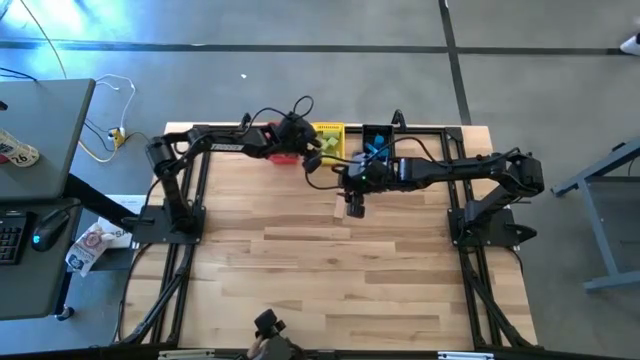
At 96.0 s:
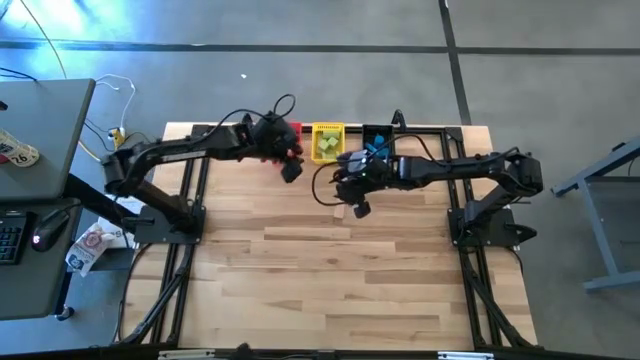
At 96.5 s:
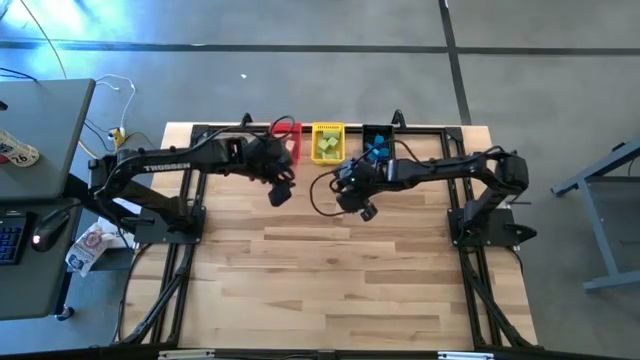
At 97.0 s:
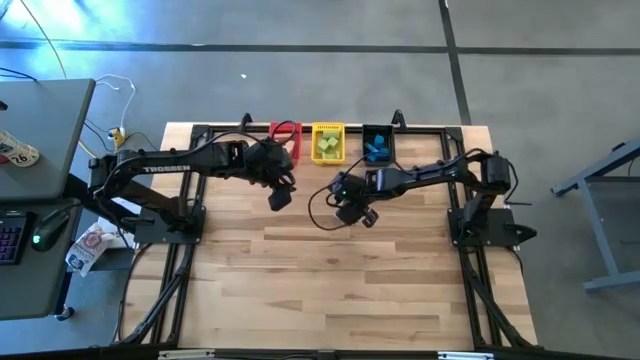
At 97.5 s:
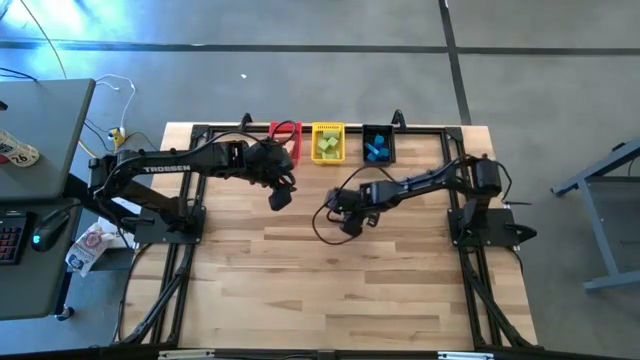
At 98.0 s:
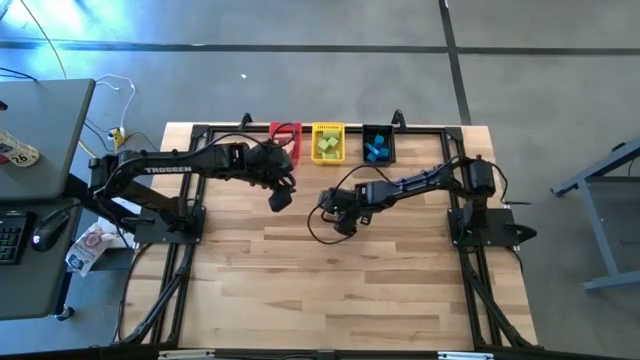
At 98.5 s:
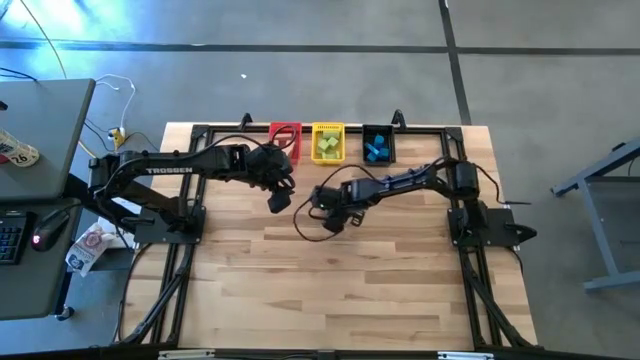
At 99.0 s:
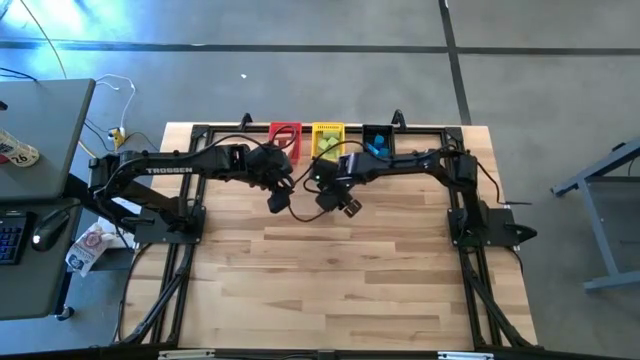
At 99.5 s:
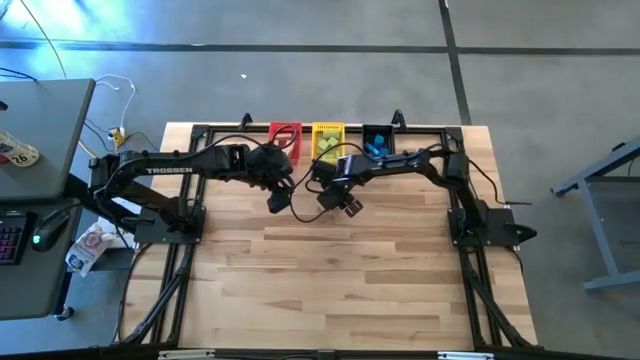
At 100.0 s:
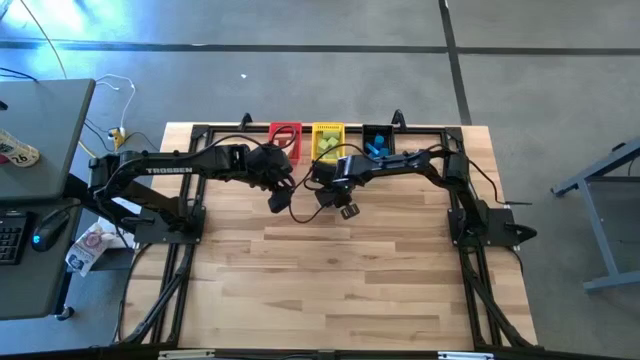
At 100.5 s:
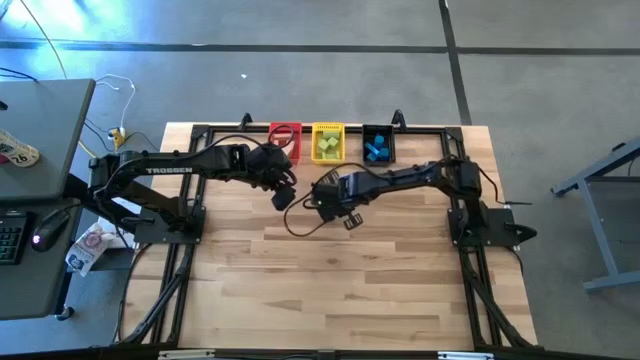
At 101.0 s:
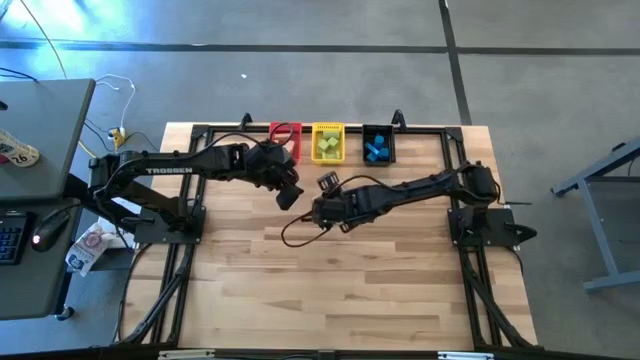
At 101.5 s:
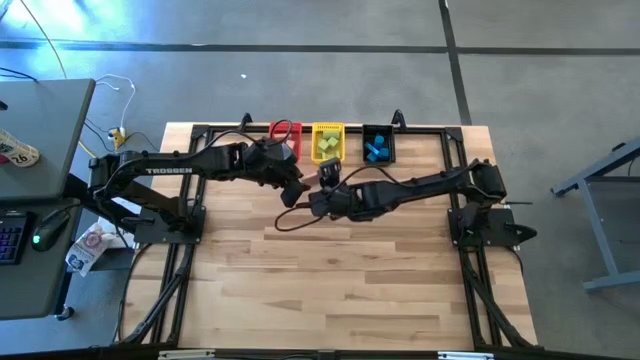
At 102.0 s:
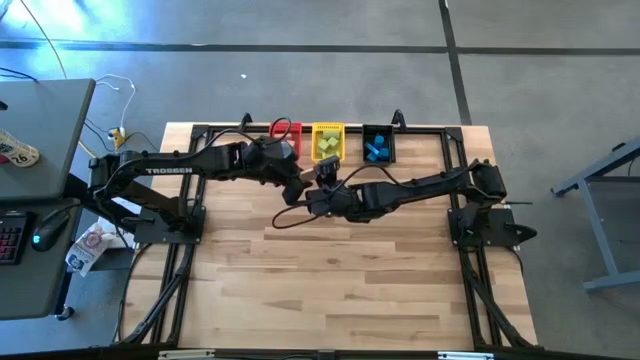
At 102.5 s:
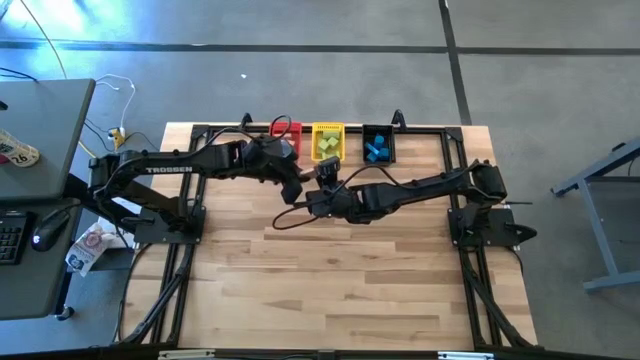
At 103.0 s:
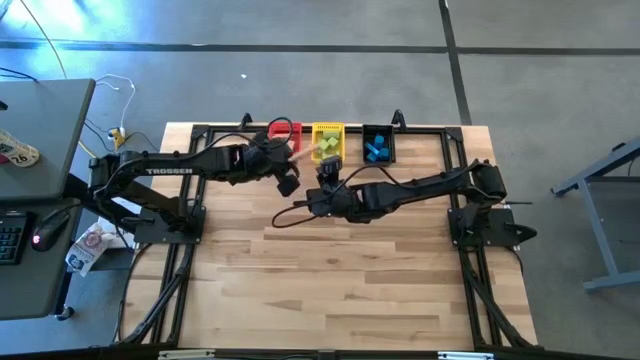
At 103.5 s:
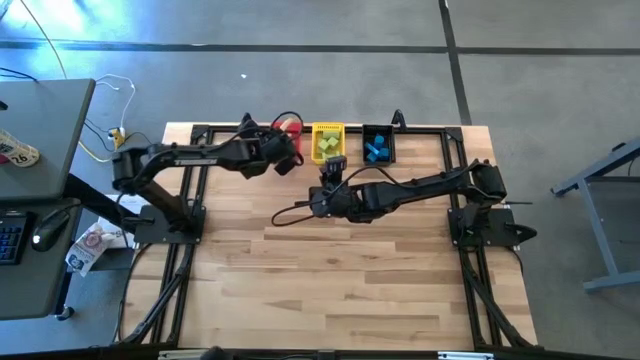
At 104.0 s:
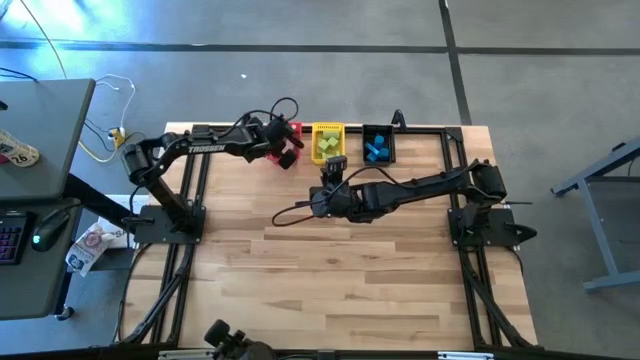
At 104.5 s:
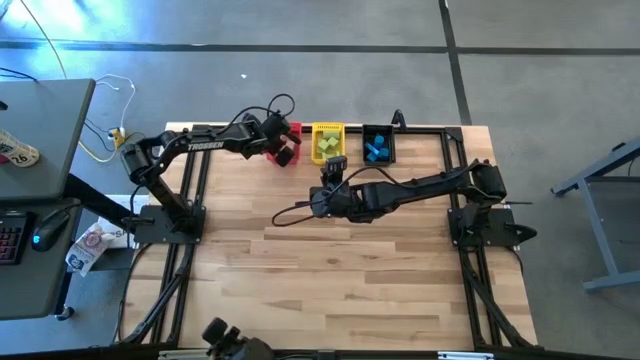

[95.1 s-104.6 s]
Task: Sort & place blocks by color
Put the brown block into the red basket

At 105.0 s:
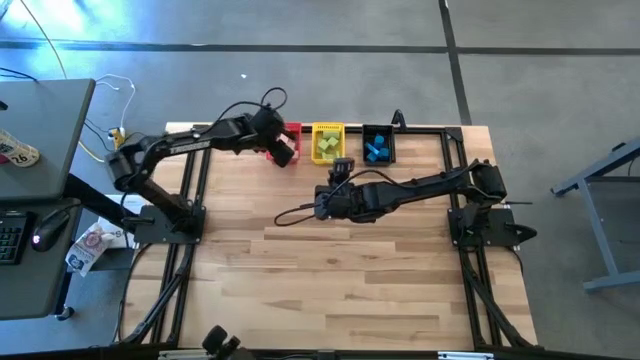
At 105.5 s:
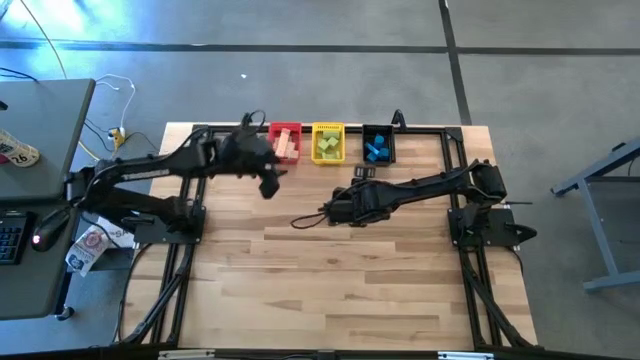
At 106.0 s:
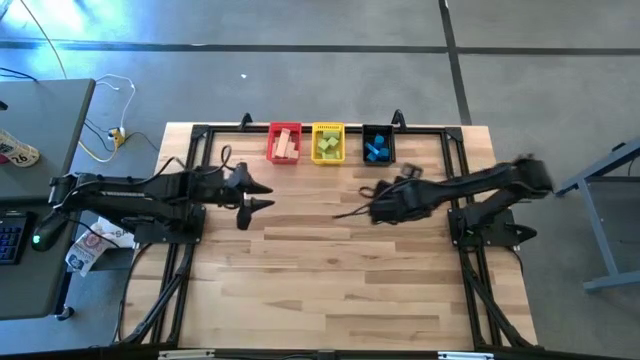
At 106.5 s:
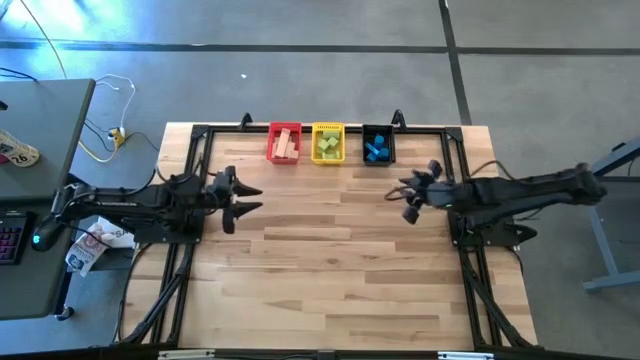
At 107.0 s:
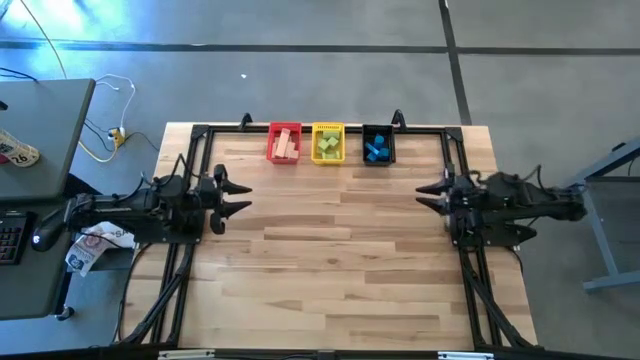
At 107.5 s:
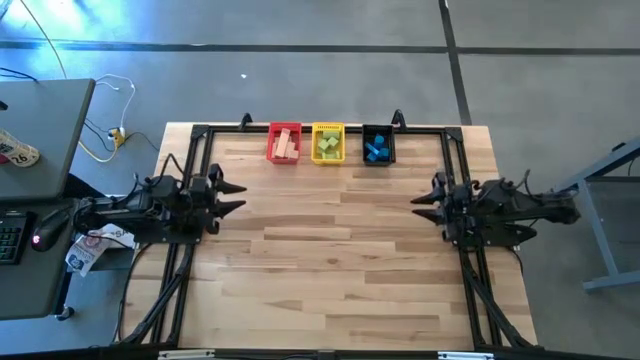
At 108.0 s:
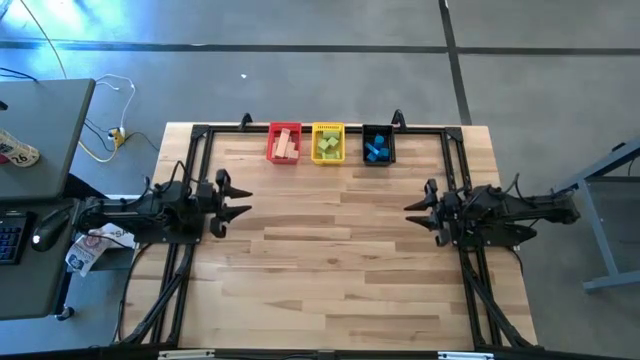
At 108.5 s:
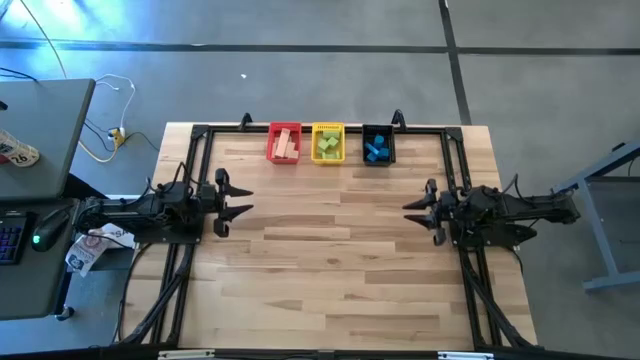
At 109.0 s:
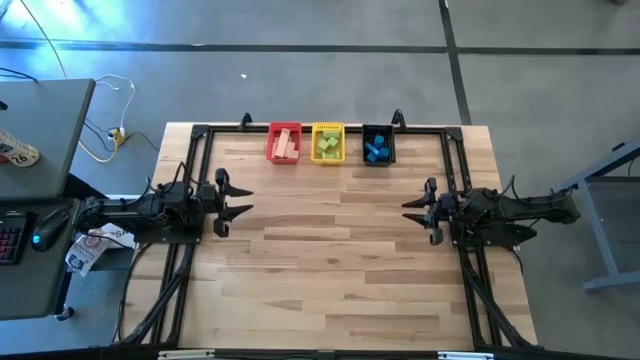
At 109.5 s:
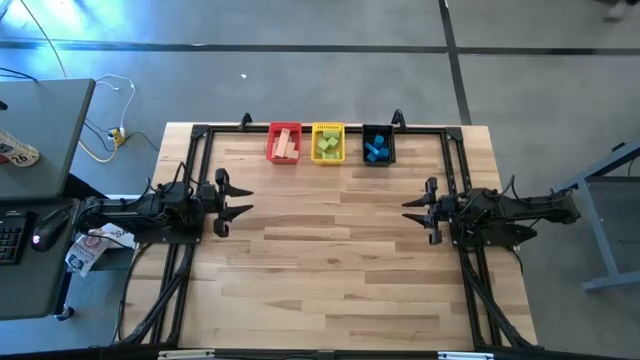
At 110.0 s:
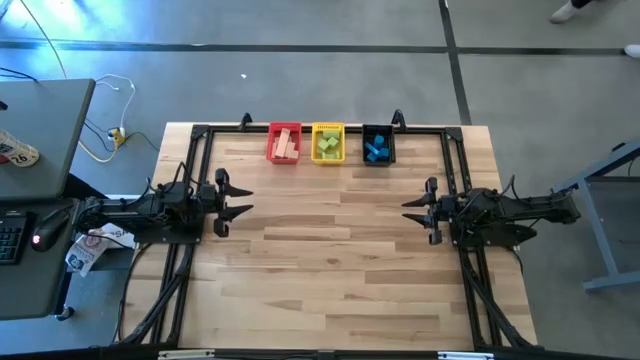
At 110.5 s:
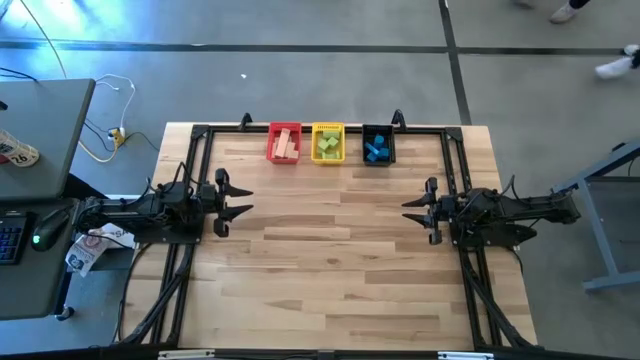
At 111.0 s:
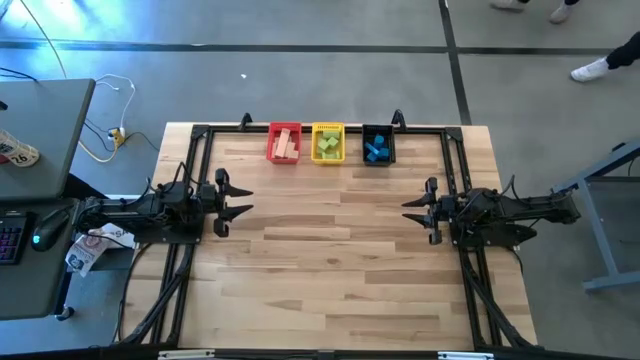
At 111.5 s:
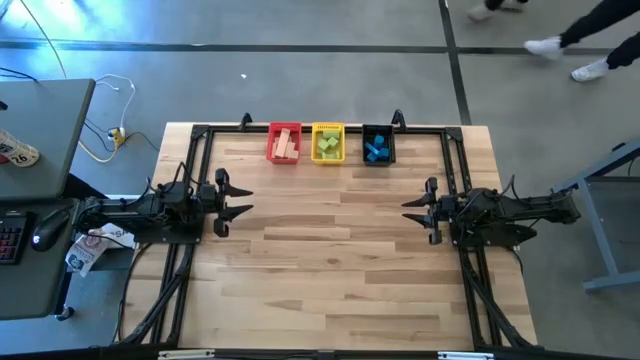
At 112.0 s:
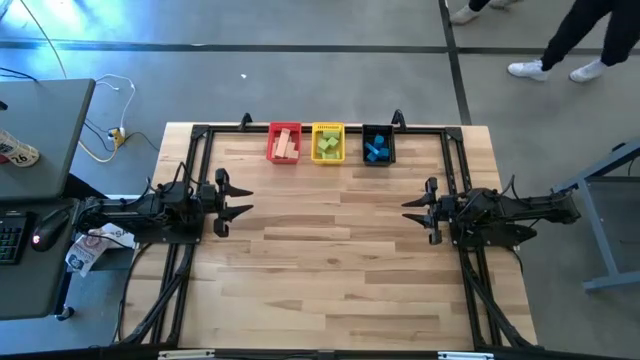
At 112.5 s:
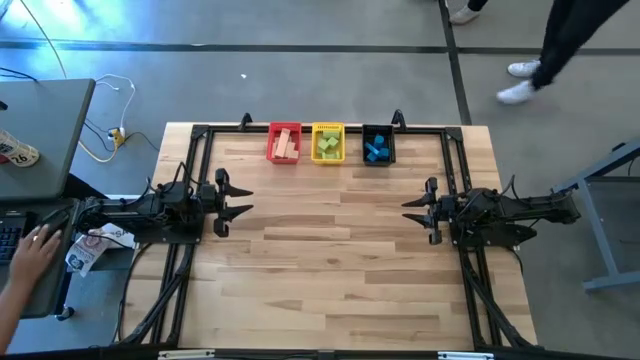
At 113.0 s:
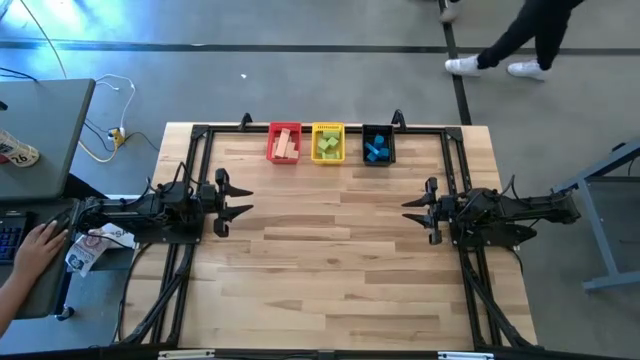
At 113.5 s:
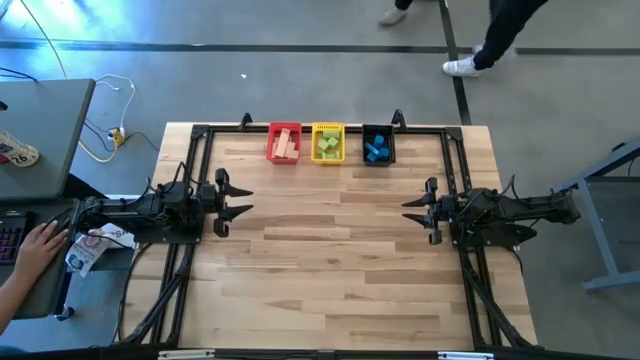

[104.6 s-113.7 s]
Return to Home Position

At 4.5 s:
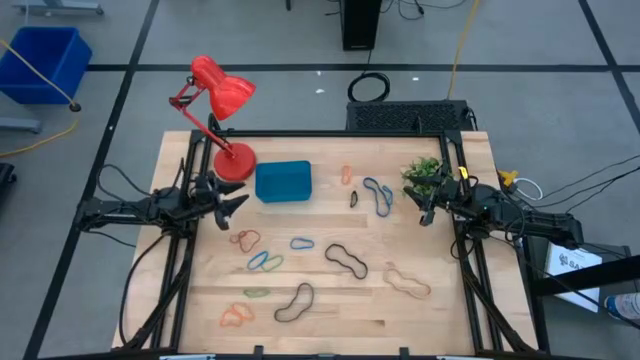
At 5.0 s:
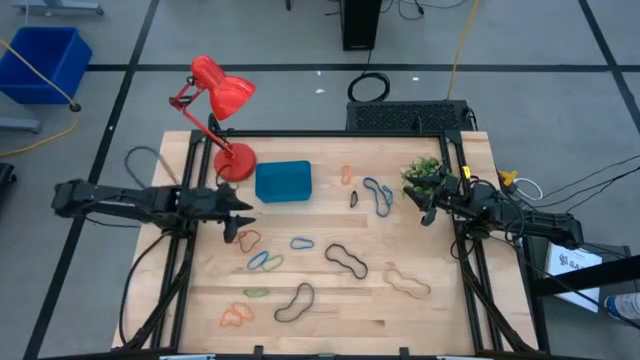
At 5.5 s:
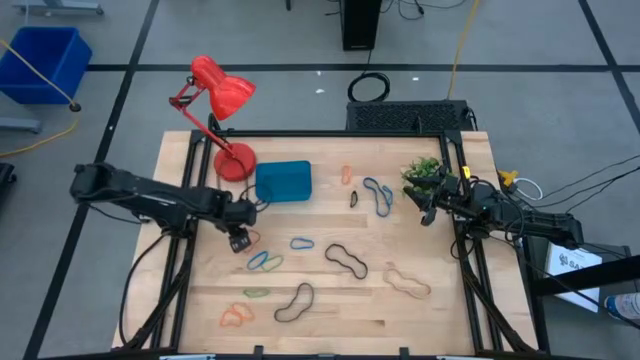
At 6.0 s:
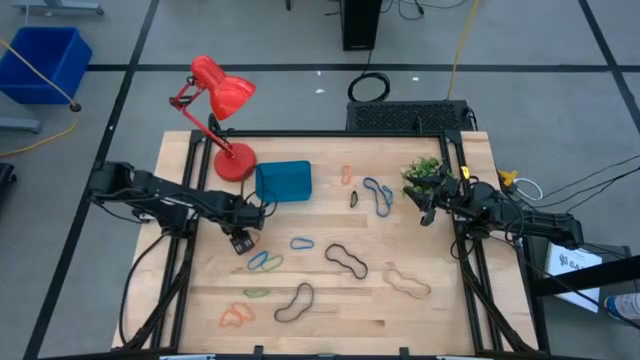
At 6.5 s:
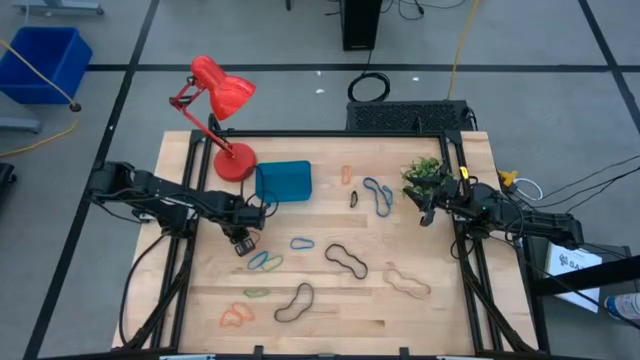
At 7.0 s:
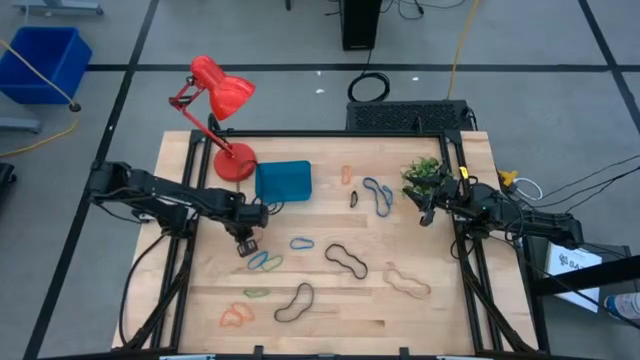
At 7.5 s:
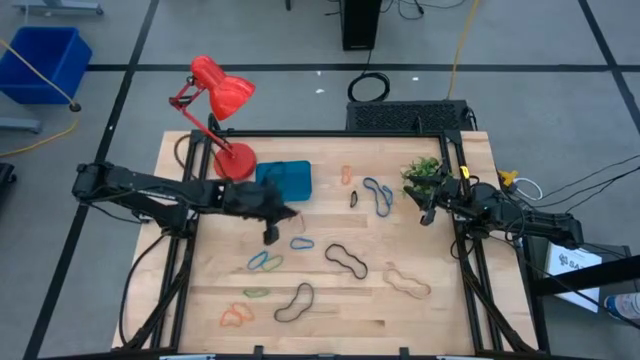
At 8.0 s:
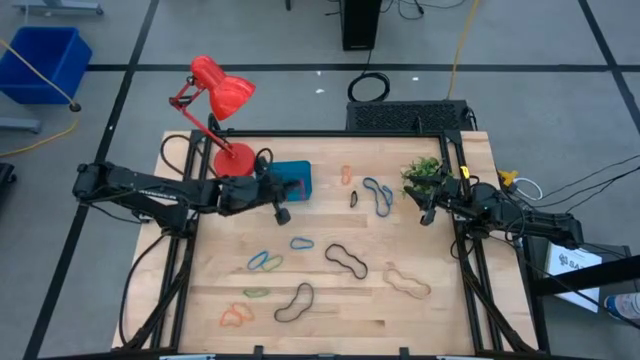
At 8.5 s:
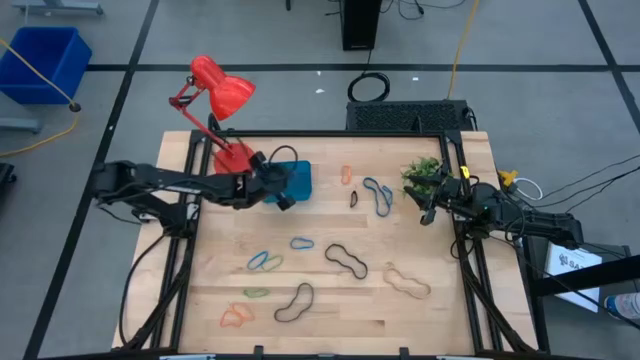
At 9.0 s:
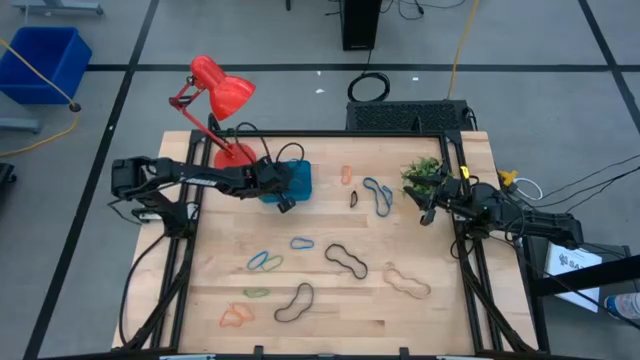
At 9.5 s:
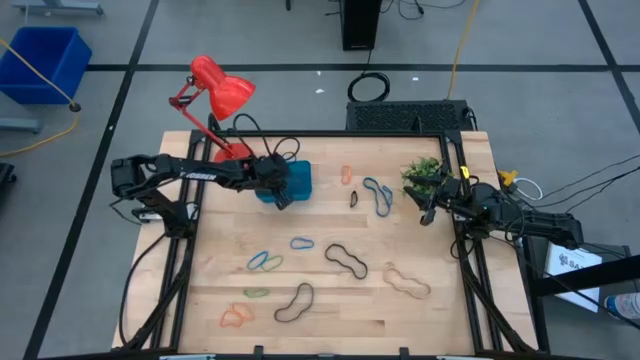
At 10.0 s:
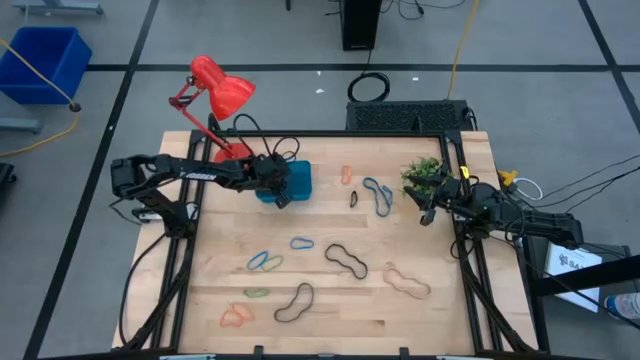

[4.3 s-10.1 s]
Task: Pick and place rubber bands into bin
Put the red rubber band into the blue bin
